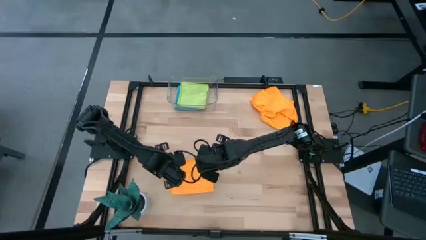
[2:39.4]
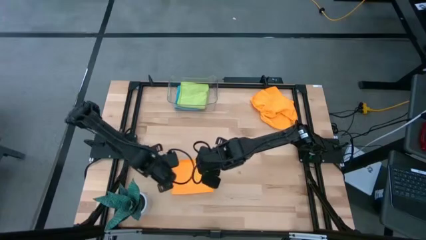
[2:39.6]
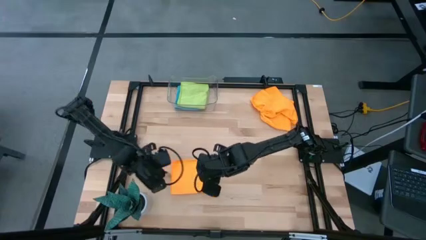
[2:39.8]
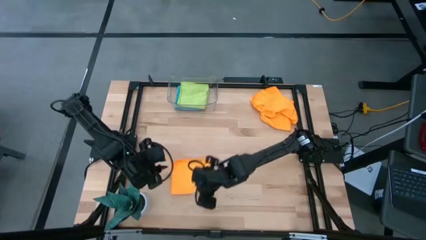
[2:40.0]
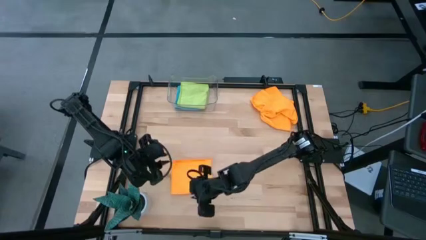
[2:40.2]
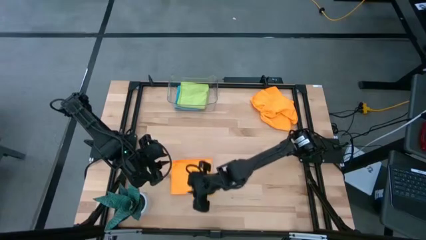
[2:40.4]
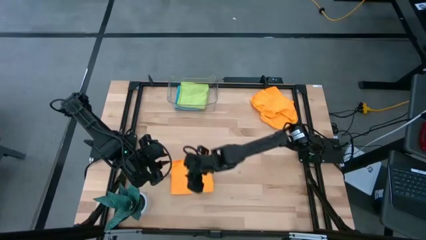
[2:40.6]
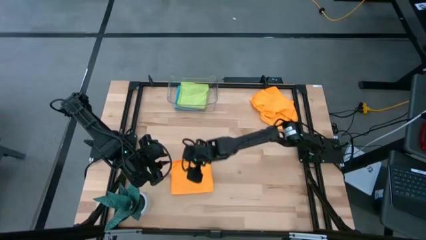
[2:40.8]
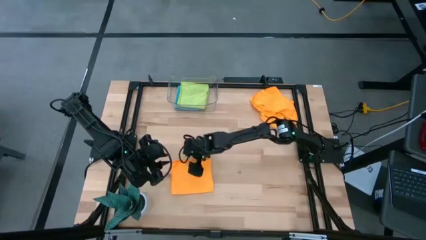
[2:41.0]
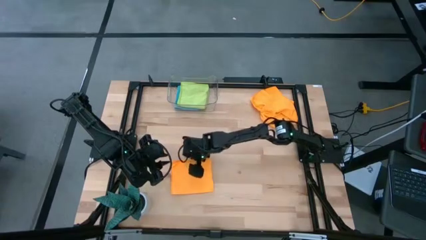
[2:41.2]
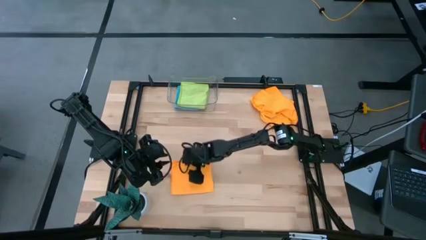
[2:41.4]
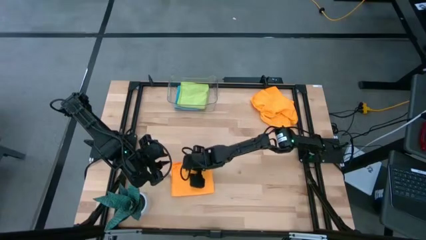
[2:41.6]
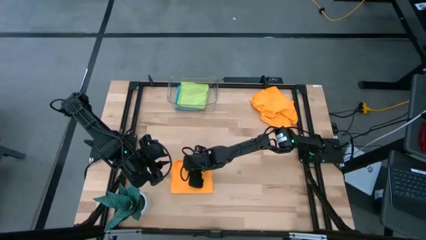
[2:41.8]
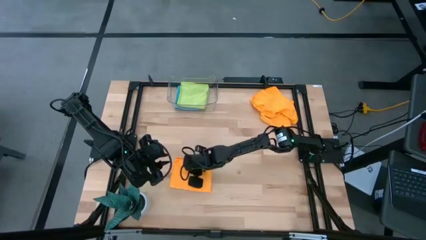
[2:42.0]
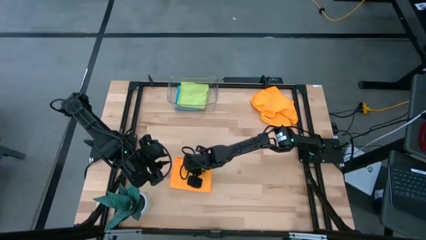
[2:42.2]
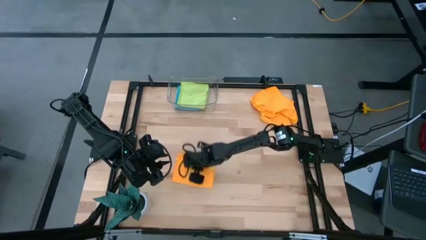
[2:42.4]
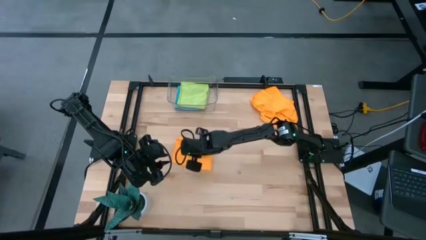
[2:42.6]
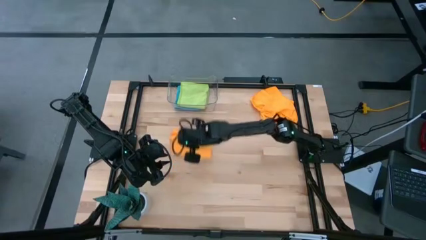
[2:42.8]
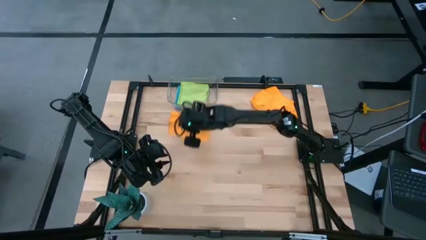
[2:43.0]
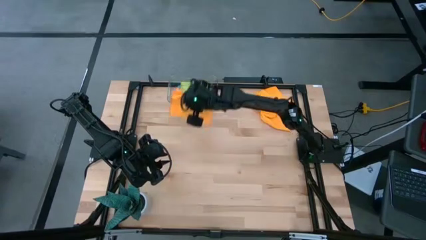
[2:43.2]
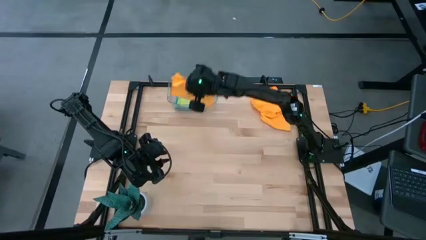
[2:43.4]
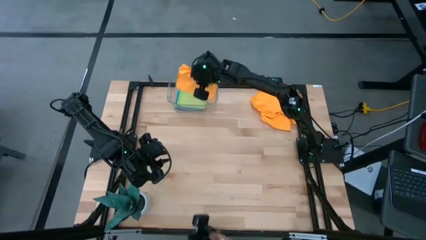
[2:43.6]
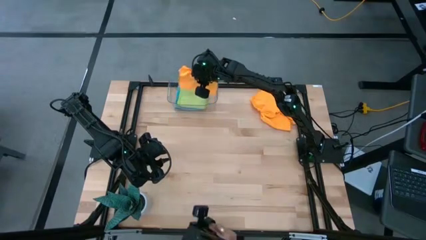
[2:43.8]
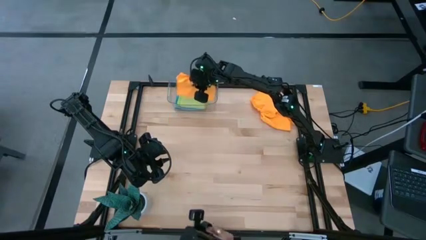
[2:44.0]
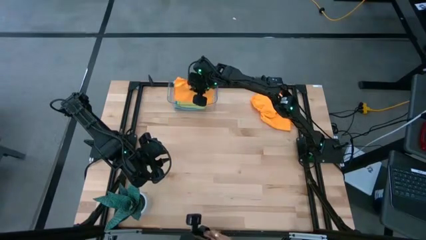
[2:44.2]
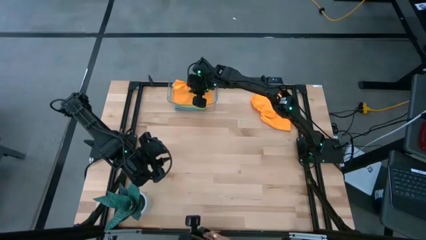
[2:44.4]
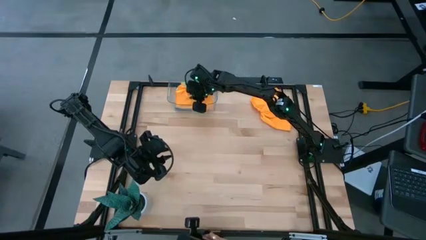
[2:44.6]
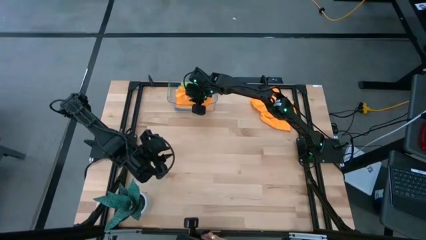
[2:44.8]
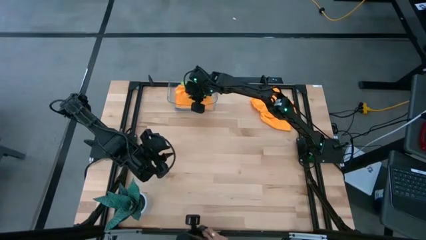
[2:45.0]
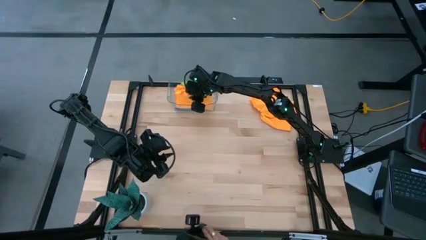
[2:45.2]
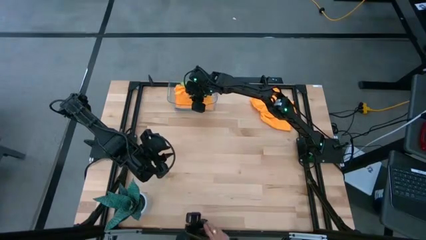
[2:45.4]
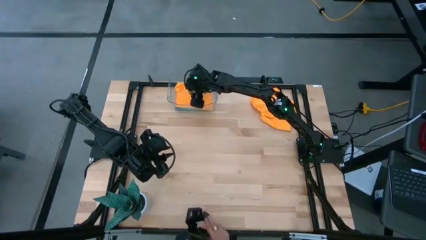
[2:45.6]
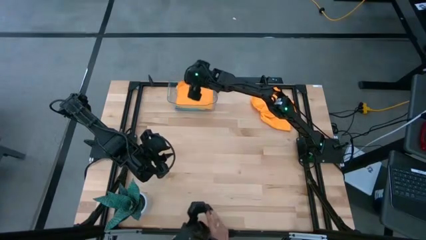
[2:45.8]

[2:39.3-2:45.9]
Task: Fold microfiber towels
Stack the folded bottom orange microfiber cloth on top of the green microfiber cloth

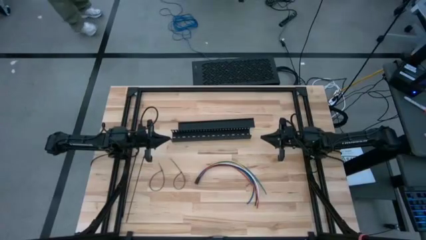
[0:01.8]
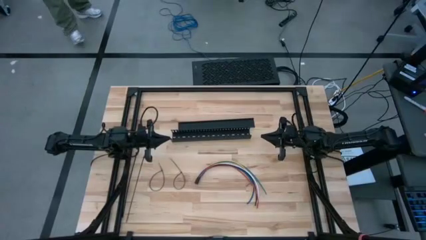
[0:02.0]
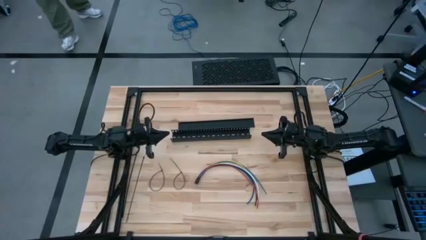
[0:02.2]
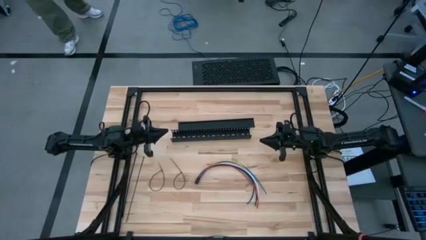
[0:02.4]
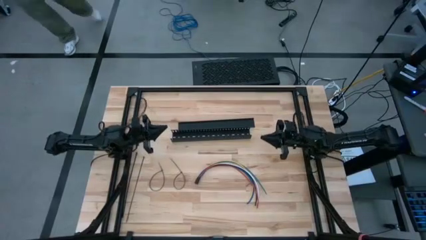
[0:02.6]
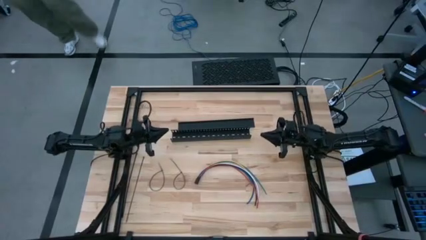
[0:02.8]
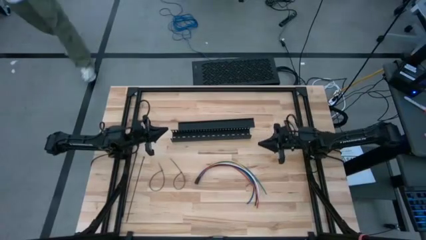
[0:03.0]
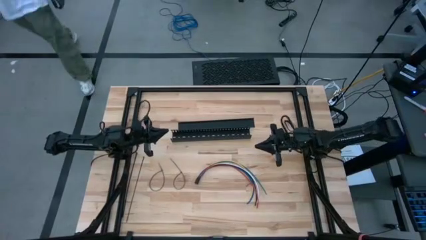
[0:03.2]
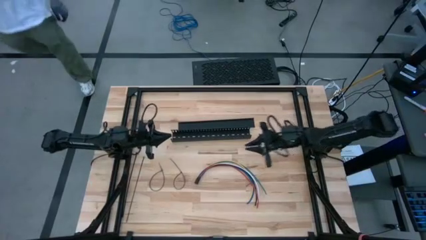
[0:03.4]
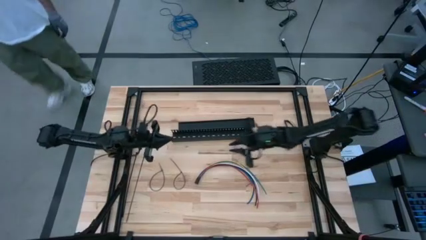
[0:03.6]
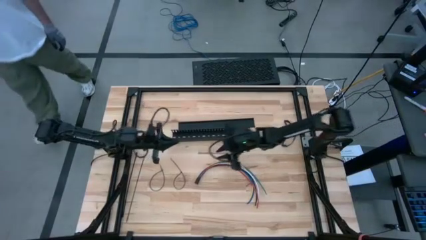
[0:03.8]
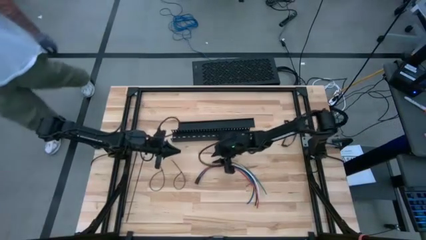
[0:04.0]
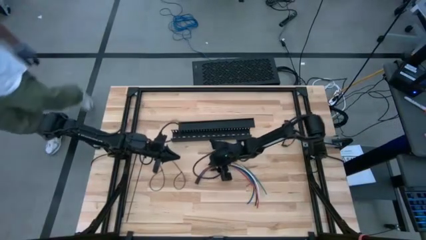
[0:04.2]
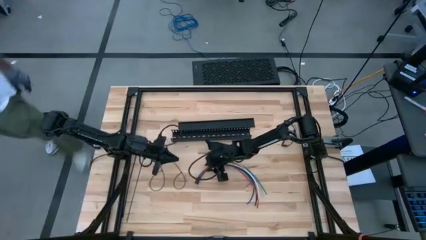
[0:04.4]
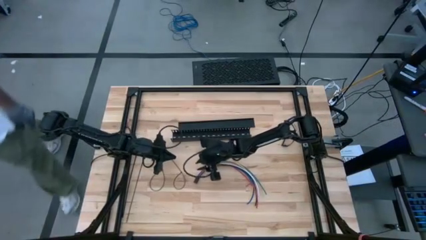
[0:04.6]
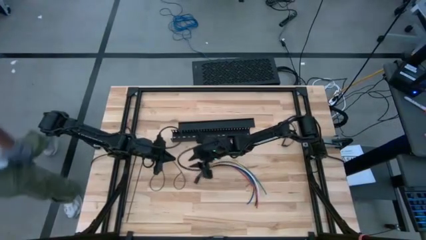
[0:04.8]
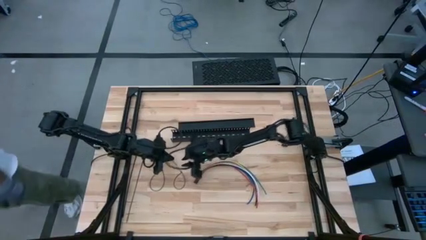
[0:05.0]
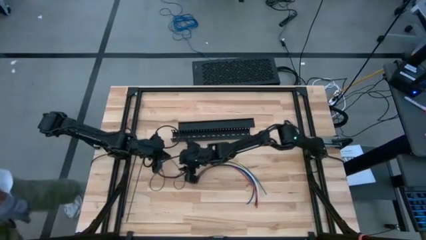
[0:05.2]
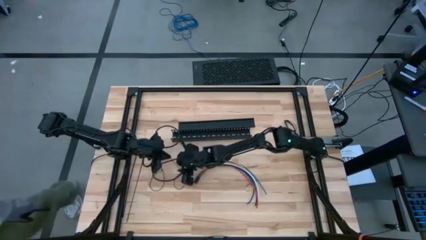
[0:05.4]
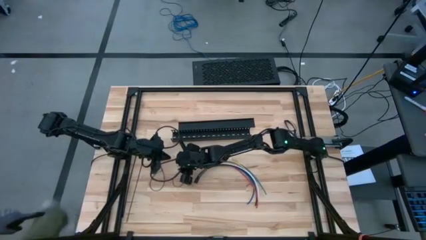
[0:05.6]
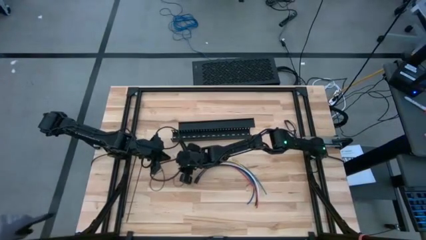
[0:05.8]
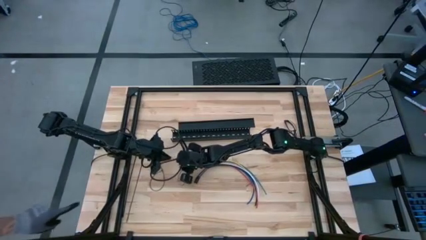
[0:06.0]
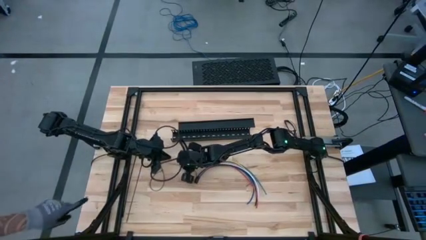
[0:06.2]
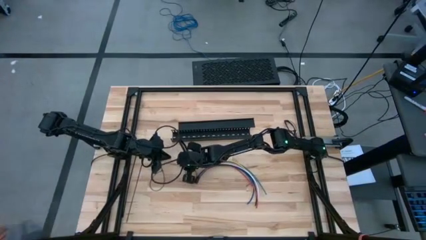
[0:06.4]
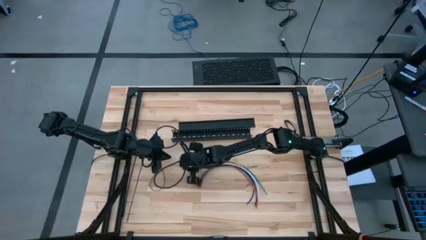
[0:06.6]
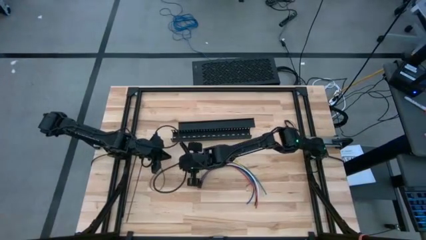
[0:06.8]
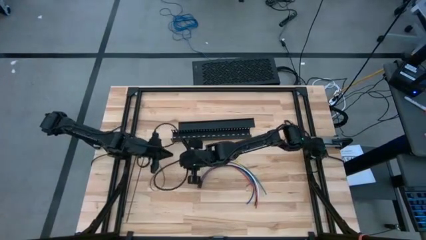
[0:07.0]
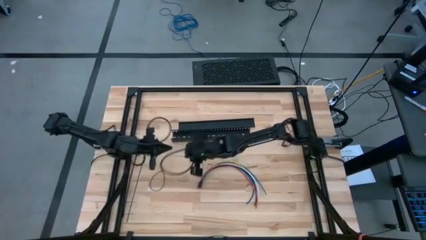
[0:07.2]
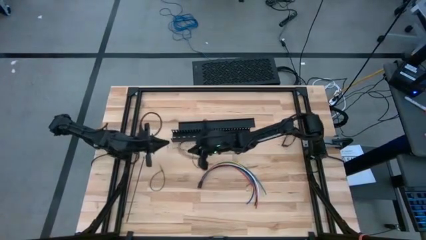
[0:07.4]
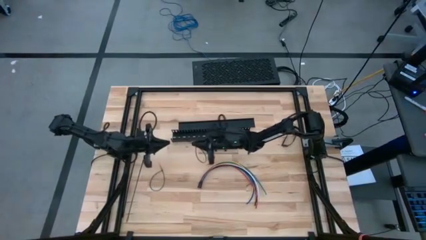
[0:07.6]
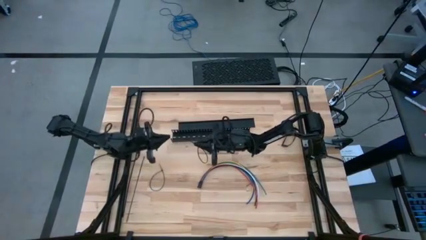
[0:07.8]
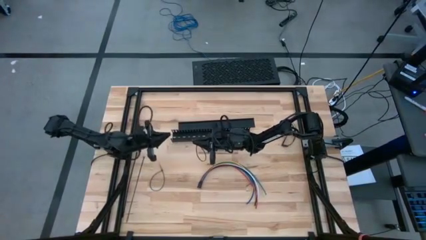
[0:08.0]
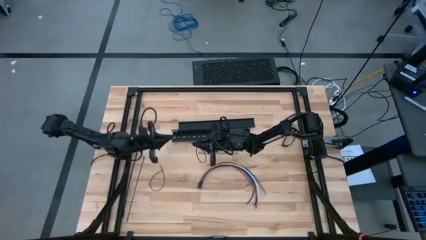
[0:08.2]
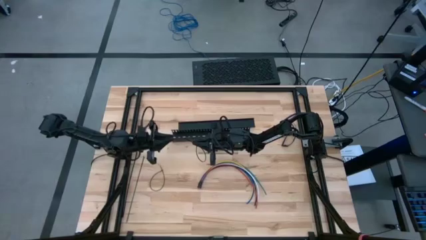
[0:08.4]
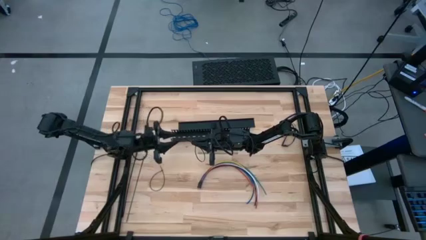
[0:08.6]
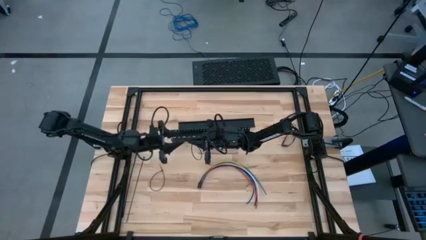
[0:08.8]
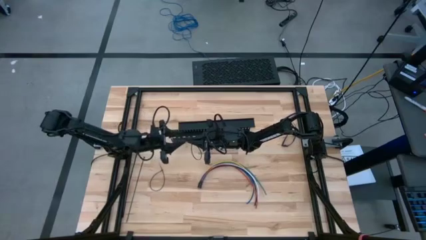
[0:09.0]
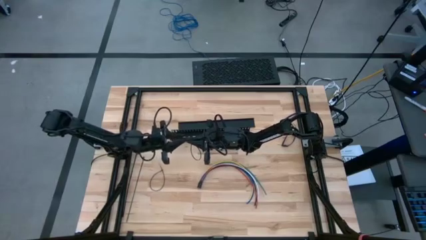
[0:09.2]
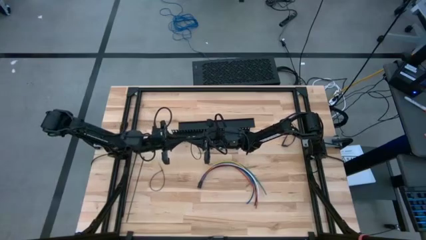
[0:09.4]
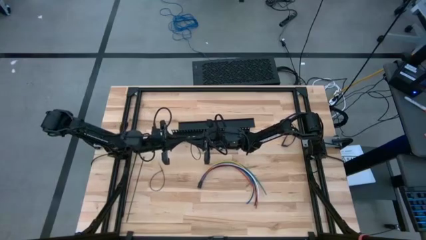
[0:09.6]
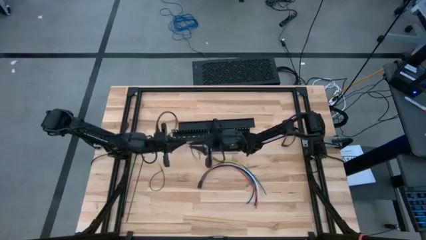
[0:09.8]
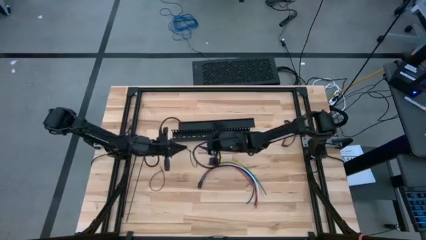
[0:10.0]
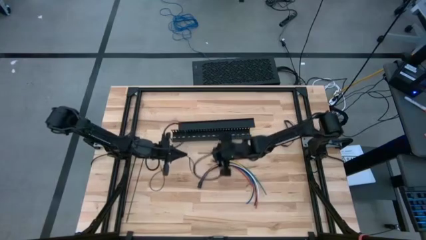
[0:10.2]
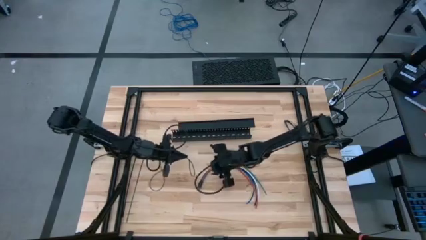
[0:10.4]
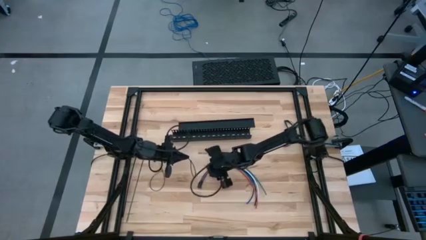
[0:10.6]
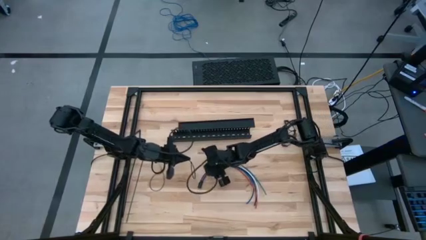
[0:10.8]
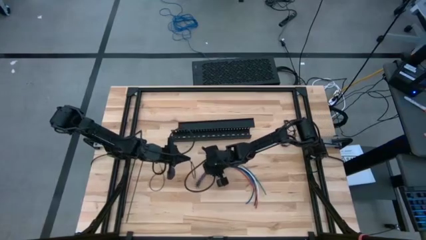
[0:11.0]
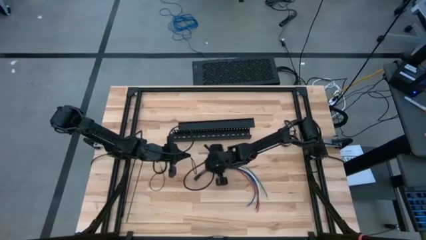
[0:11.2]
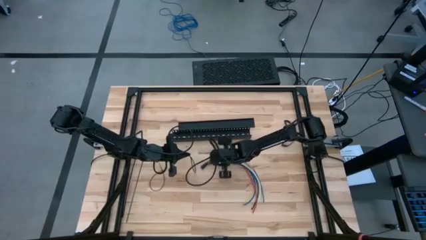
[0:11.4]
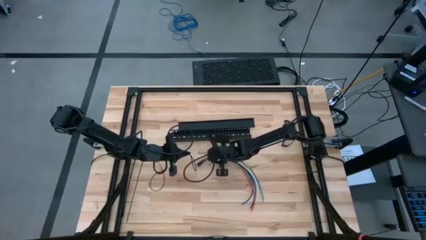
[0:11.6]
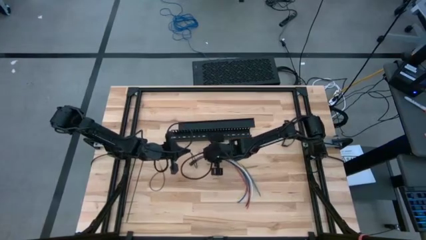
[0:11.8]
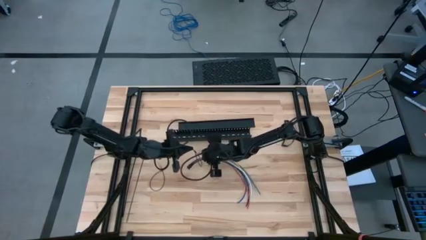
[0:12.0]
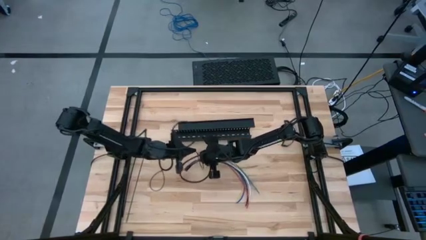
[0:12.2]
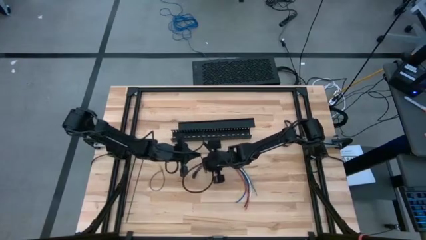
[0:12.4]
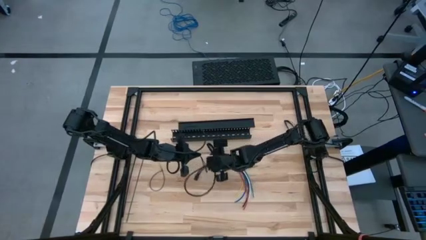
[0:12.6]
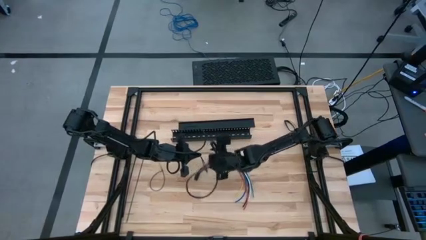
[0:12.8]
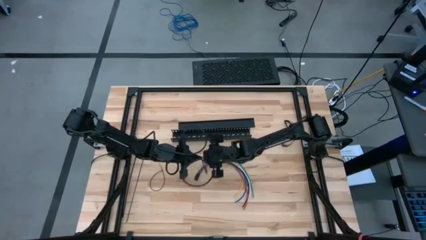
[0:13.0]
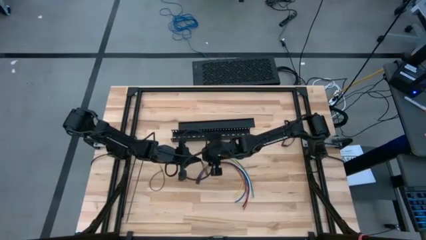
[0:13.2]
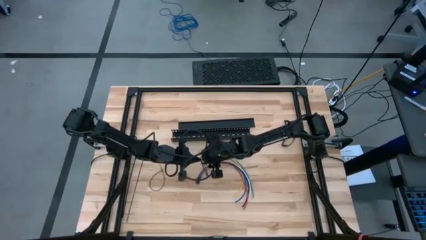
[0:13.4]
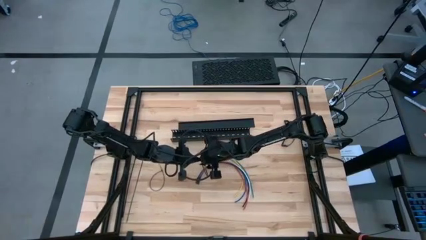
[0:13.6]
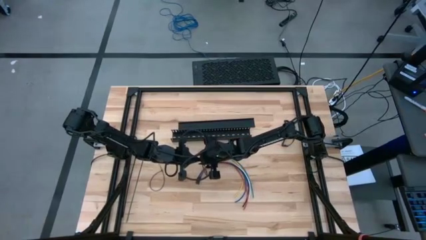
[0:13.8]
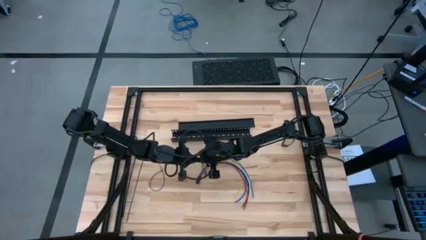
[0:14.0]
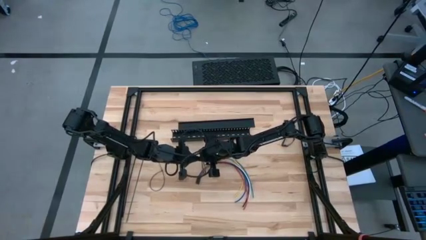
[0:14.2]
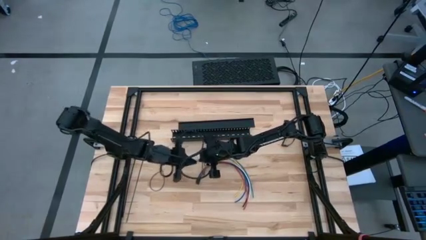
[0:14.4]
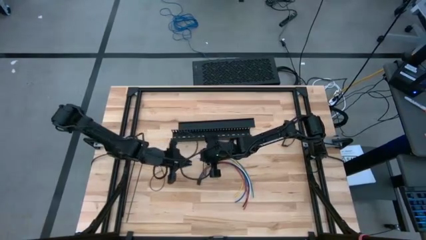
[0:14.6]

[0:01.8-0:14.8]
Task: Ziptie cables
Wrap the cable wire using a zip tie
